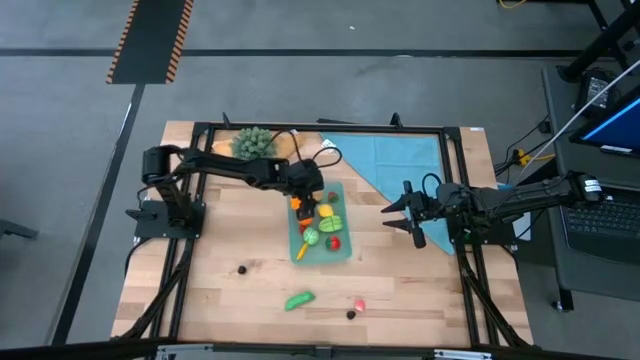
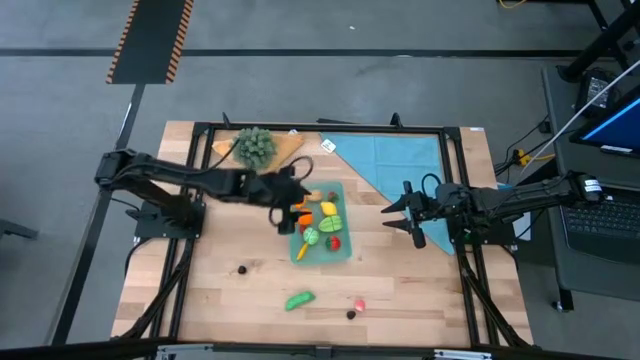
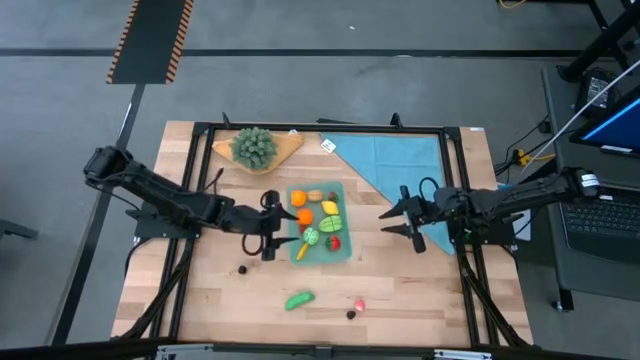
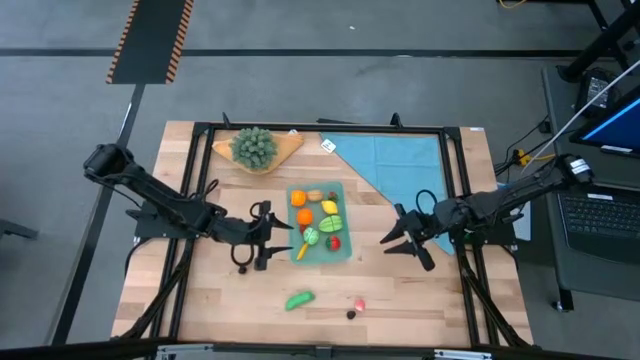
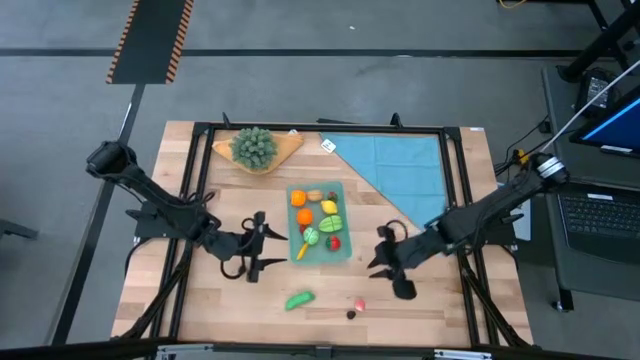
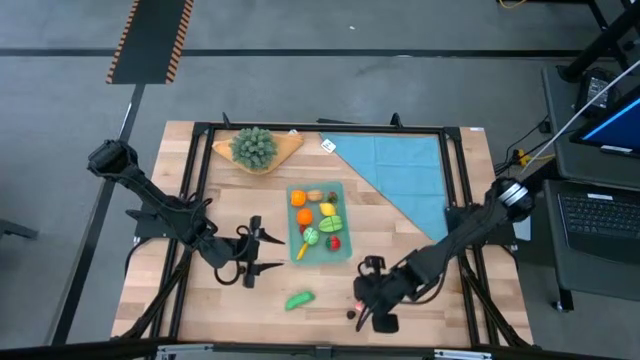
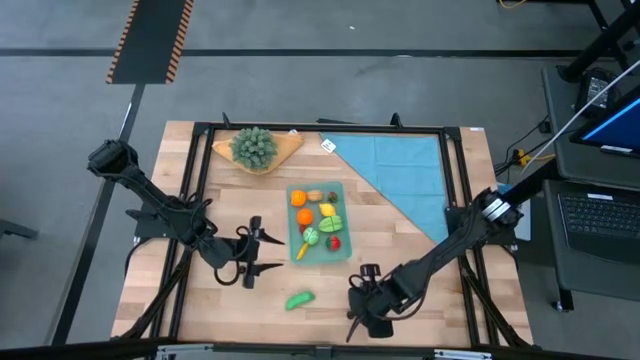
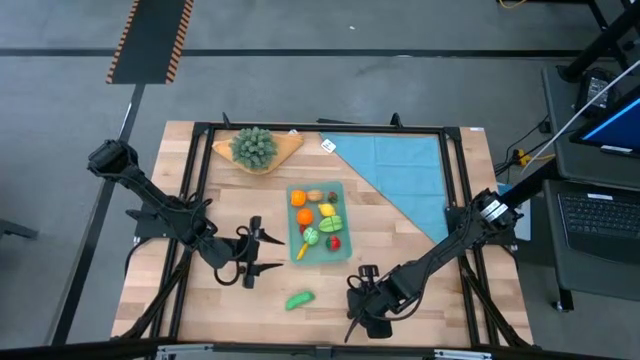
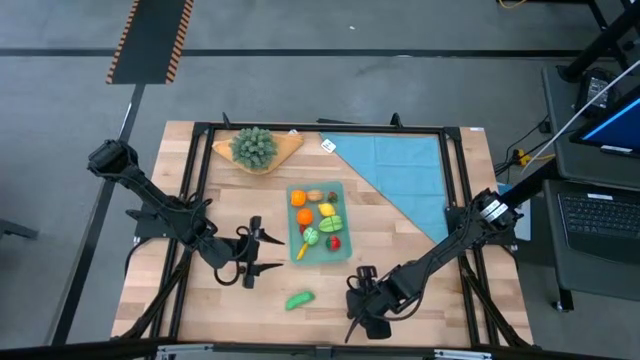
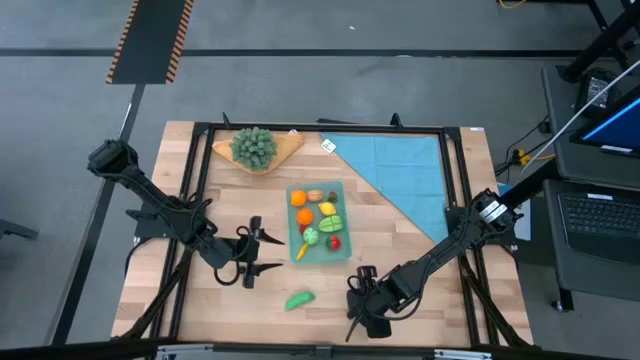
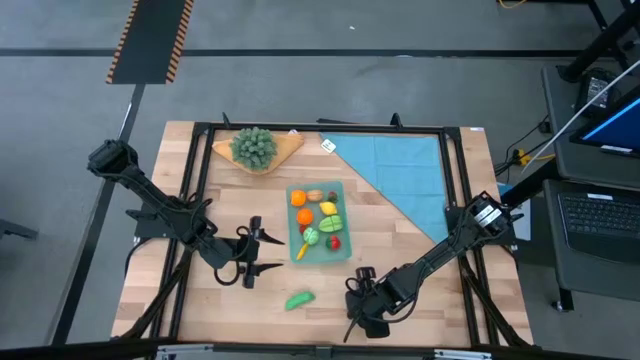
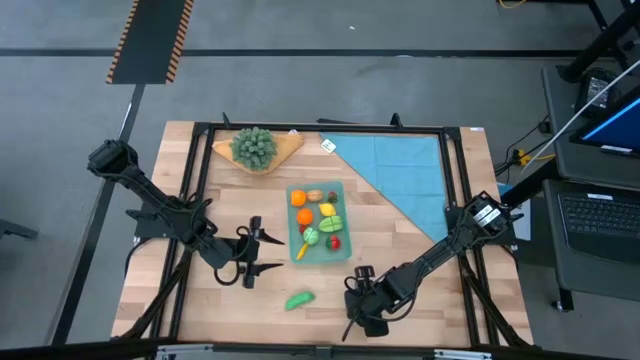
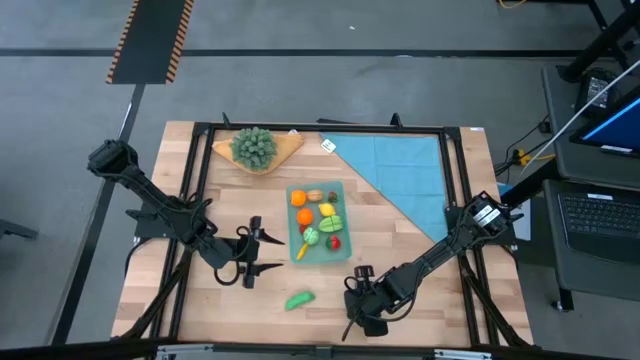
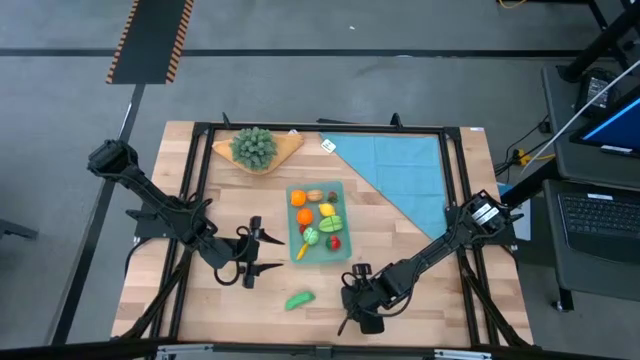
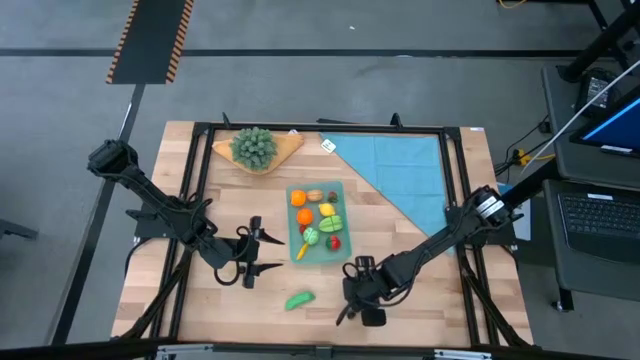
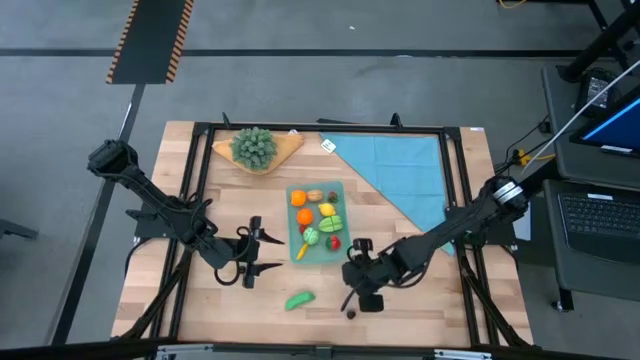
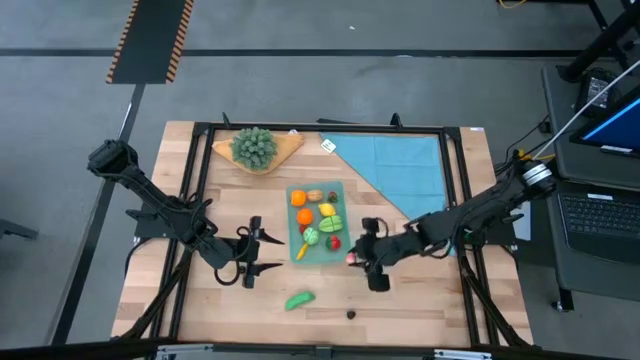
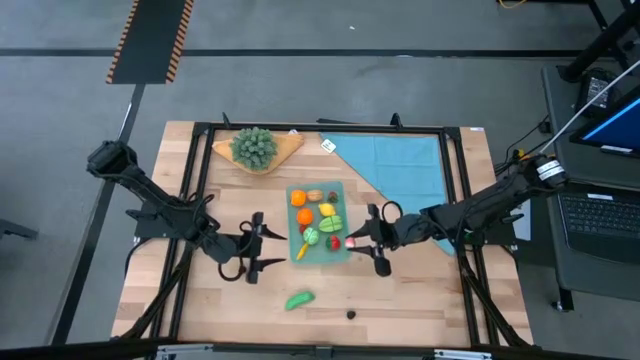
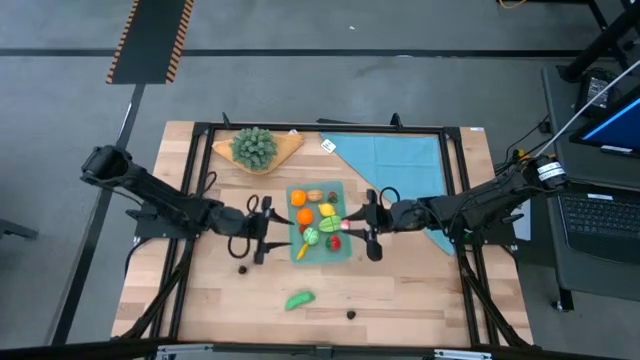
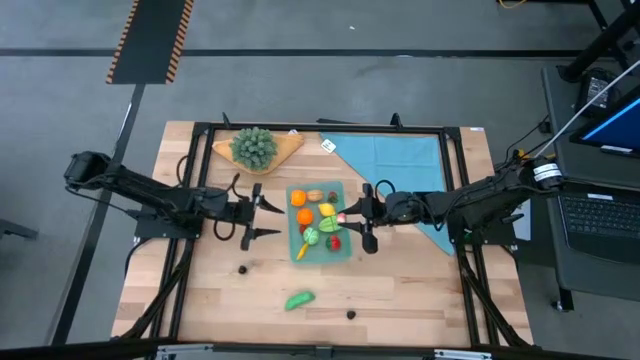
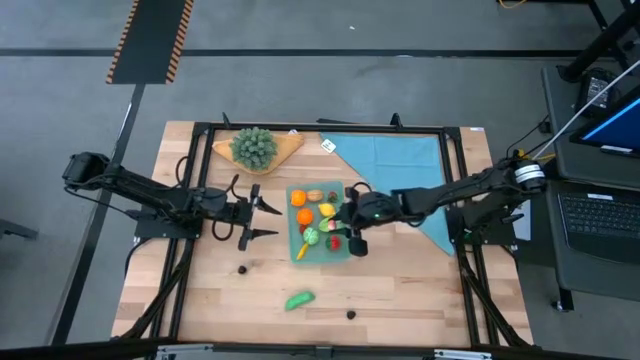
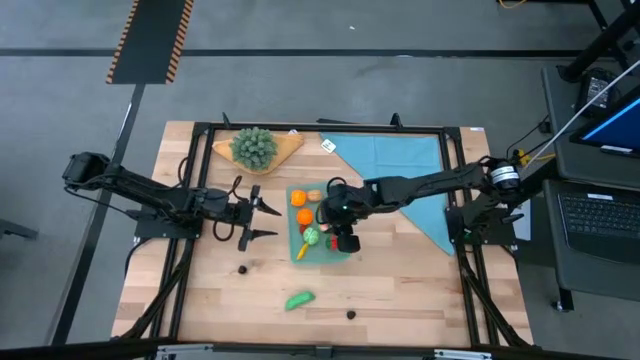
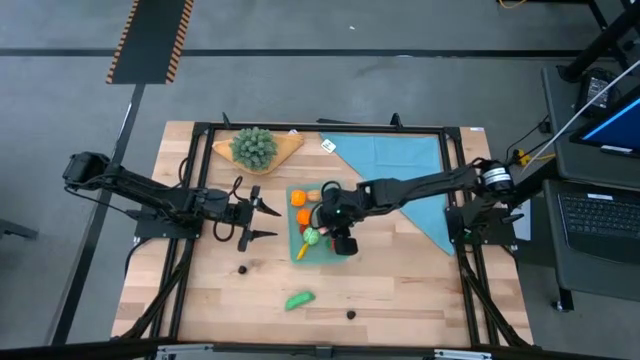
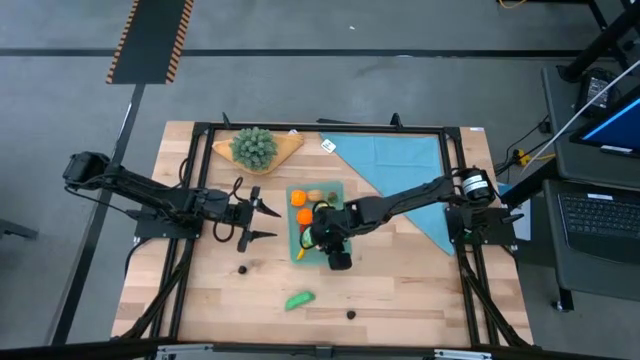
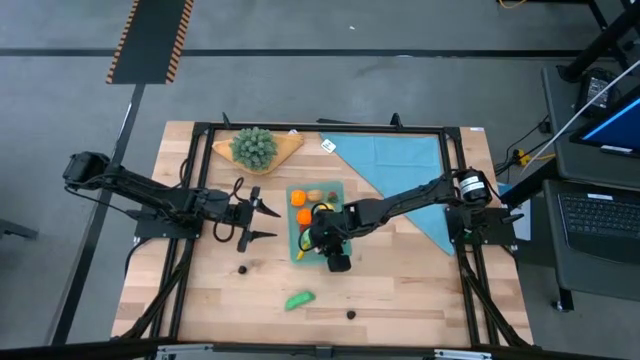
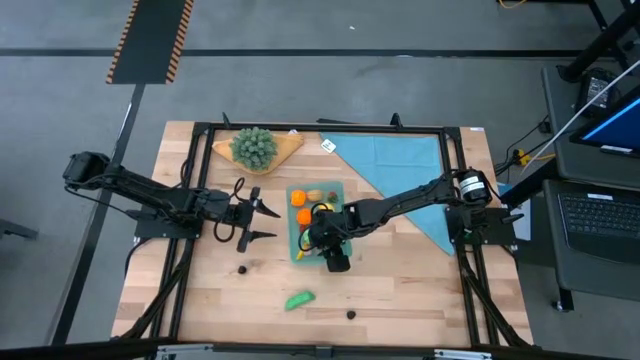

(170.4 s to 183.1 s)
Task: Pick and placing Produce into tupperware
Put the peach into the bin

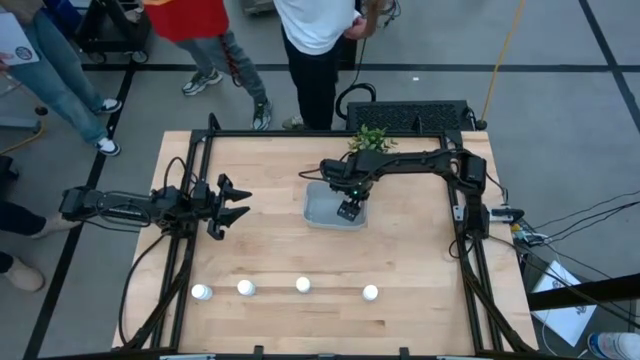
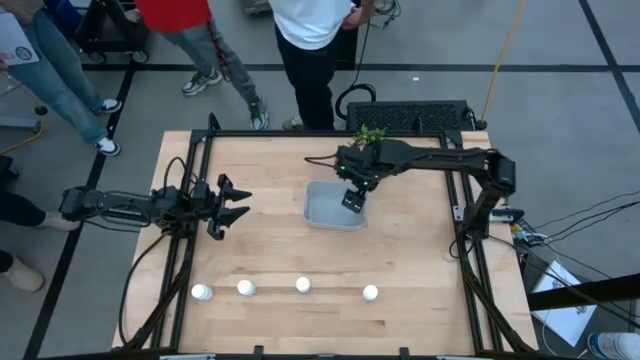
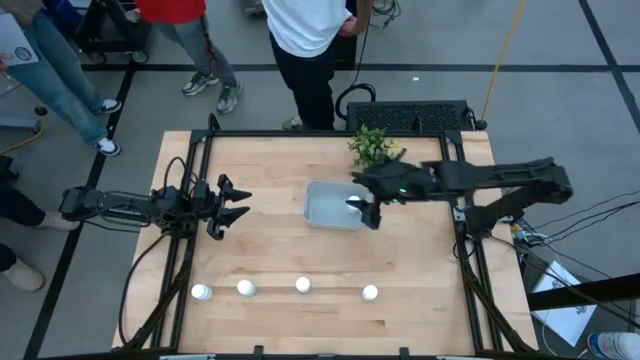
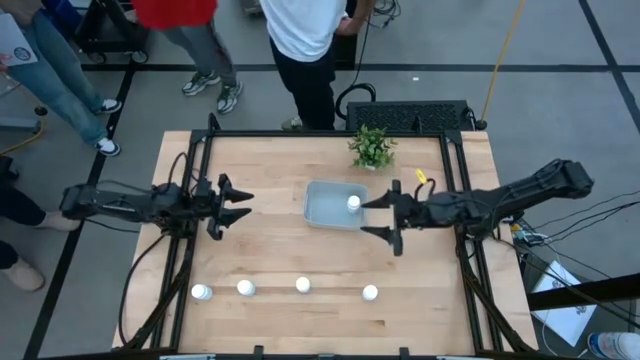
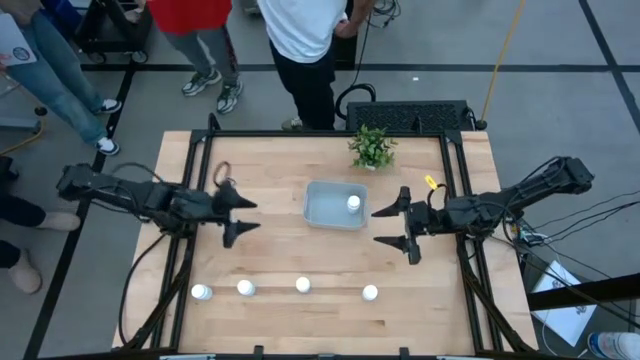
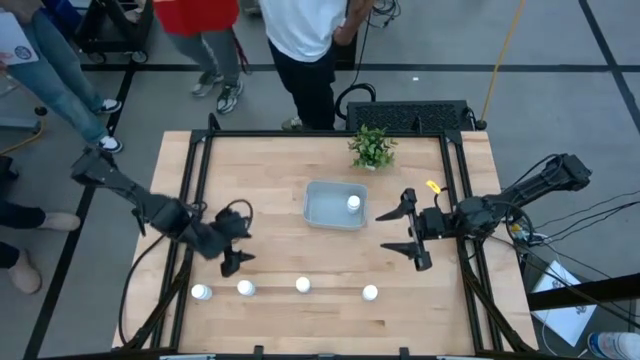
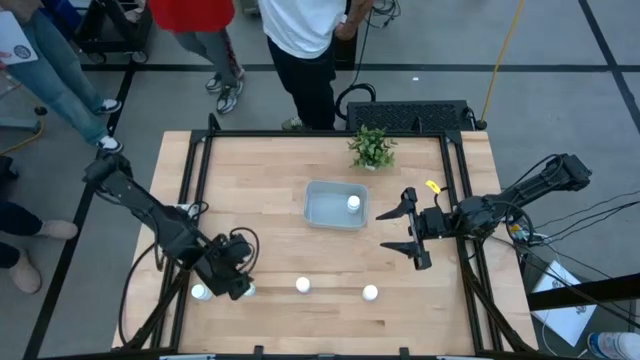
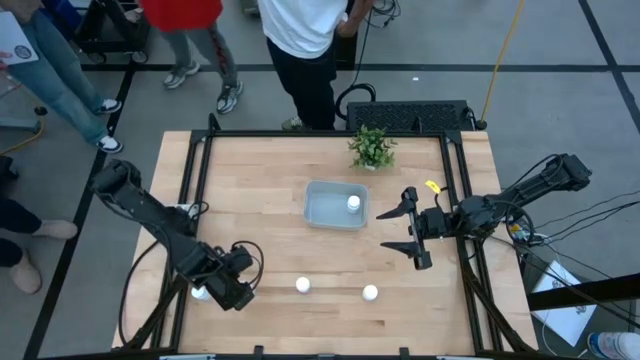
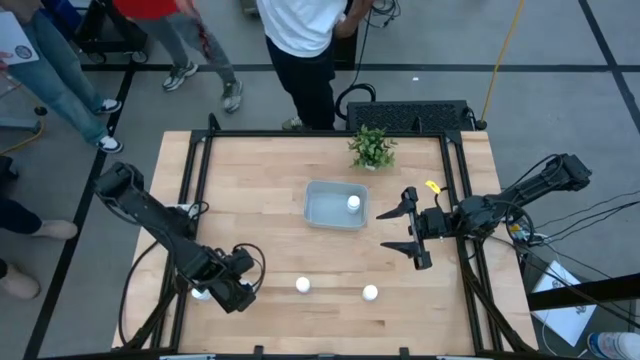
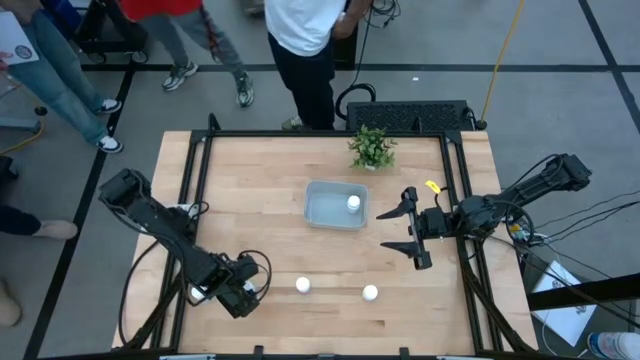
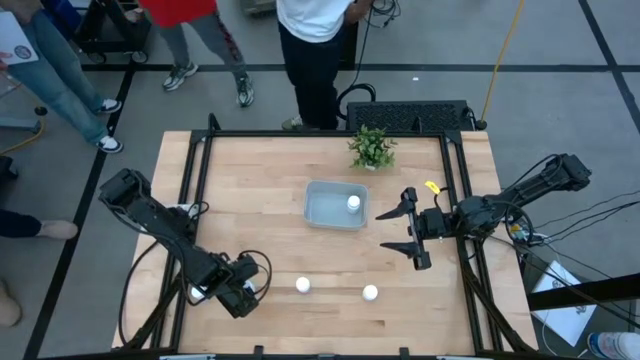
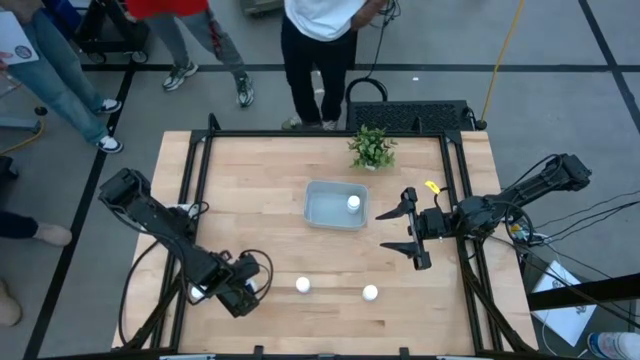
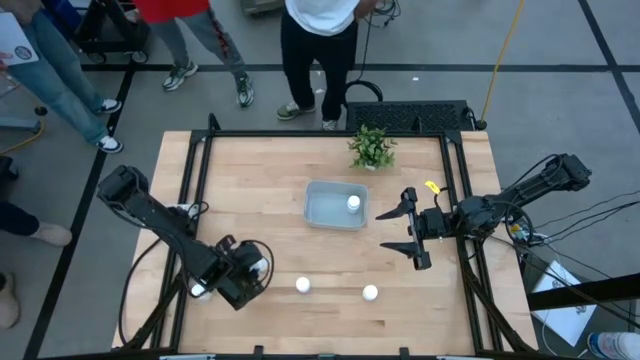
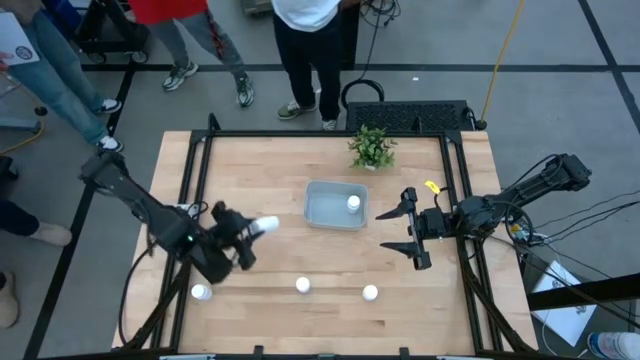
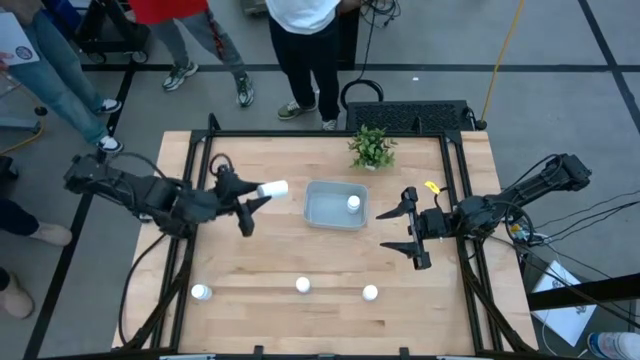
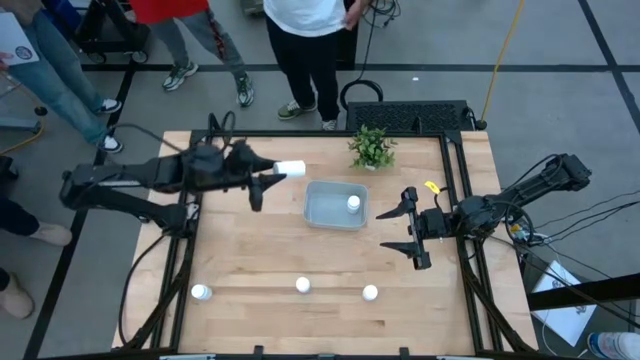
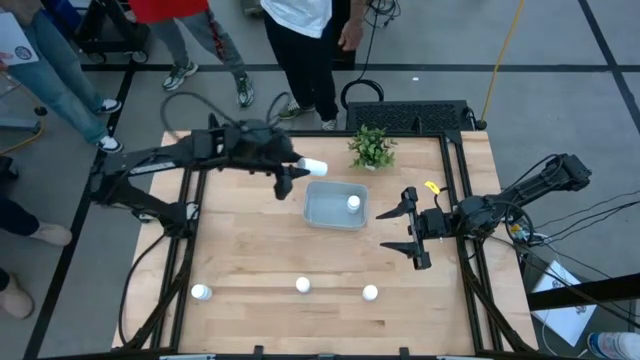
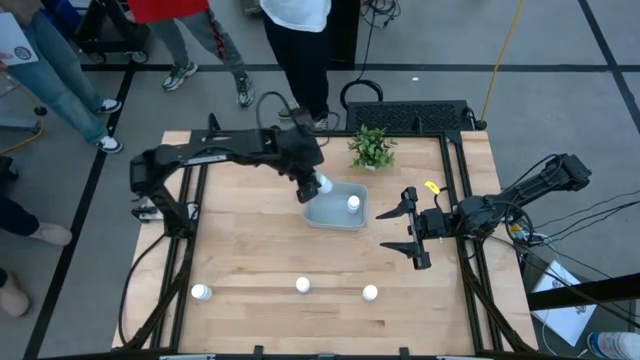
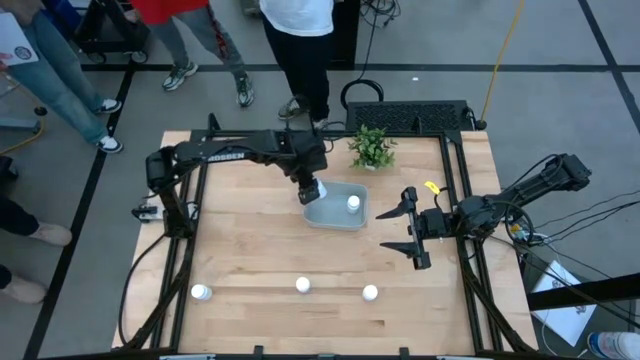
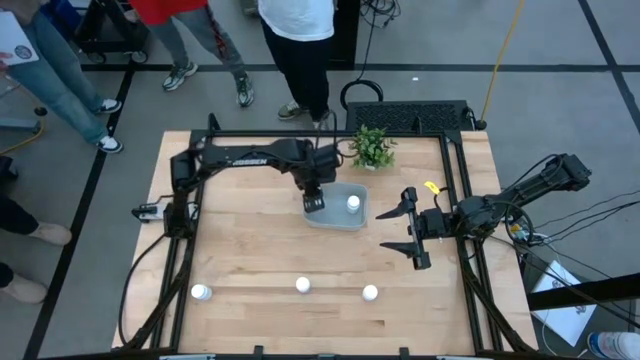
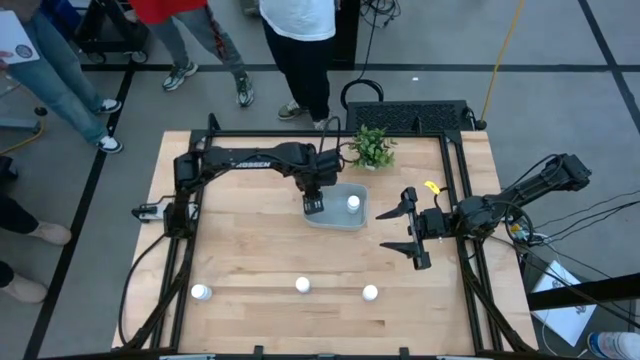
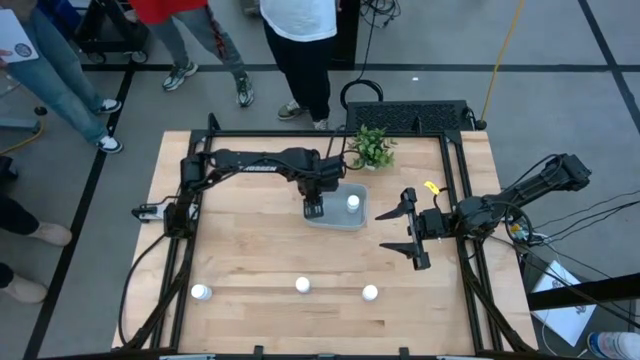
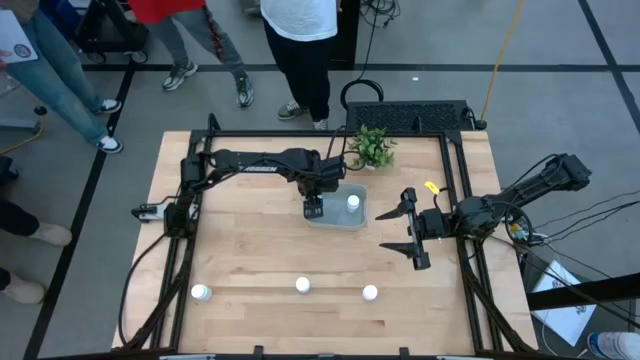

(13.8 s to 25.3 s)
Task: Pick and place pill bottles into a basket
Put the white medicine bottle into the gray bin
